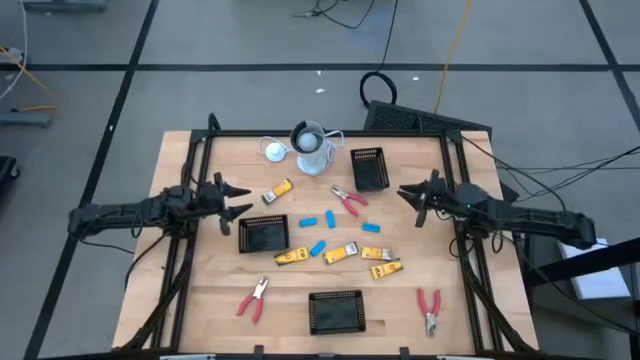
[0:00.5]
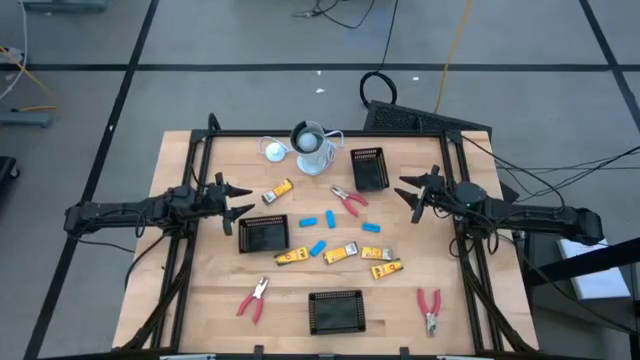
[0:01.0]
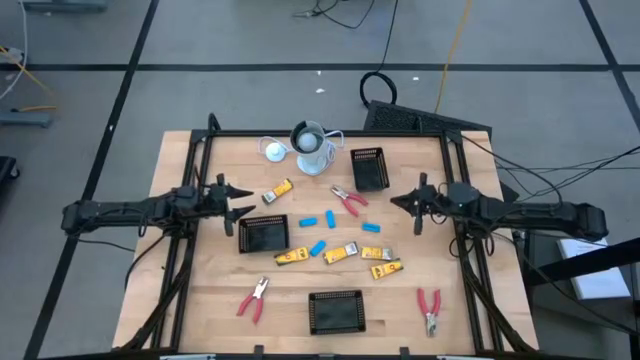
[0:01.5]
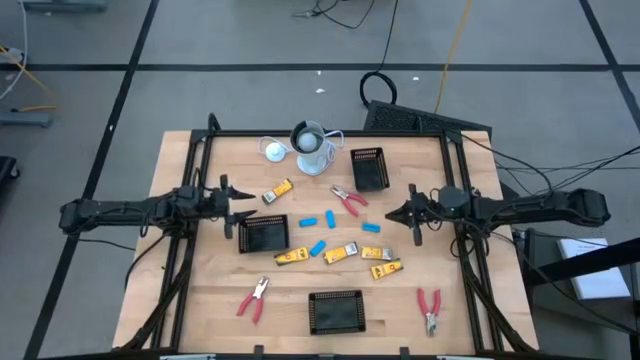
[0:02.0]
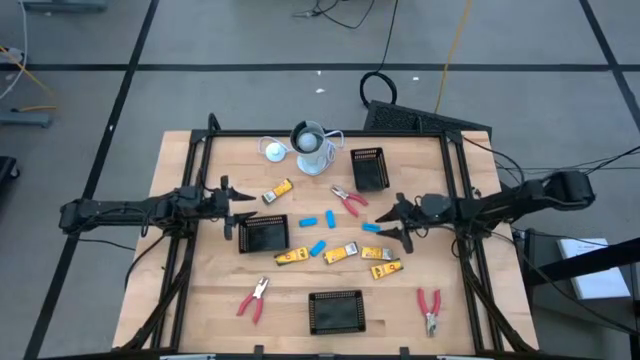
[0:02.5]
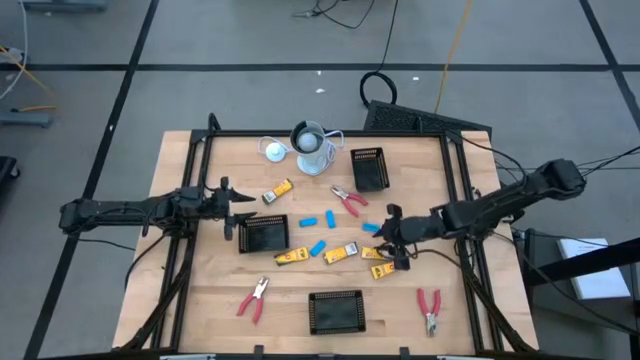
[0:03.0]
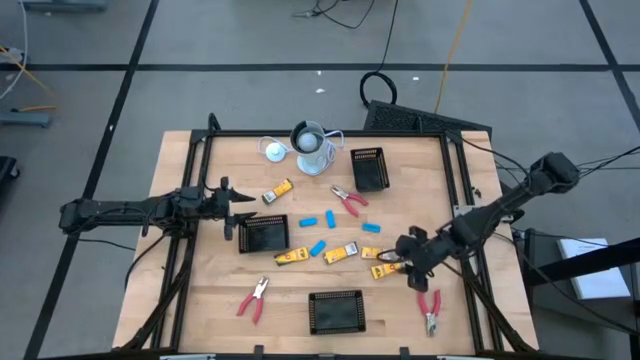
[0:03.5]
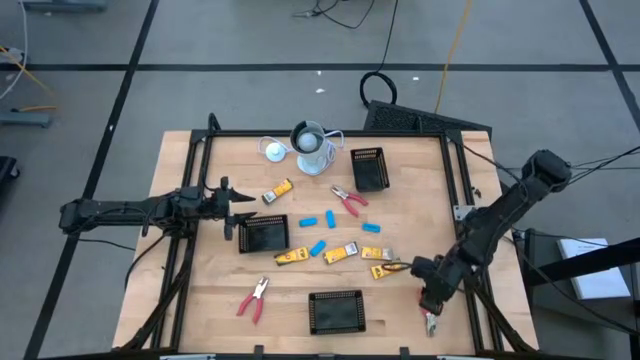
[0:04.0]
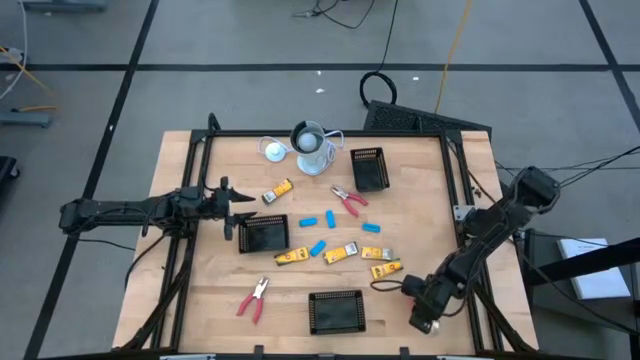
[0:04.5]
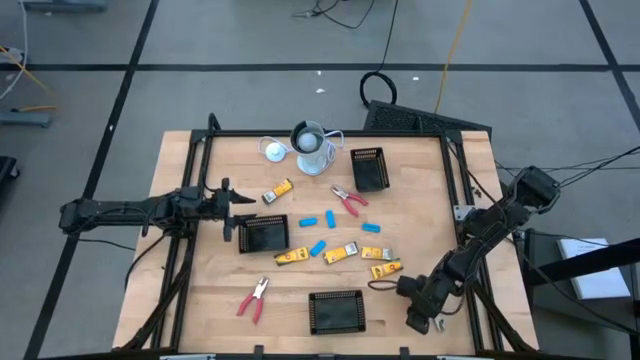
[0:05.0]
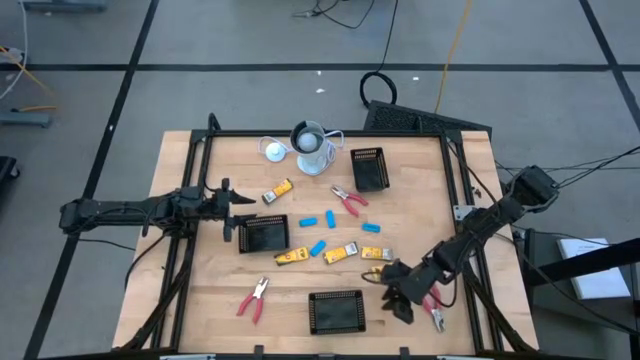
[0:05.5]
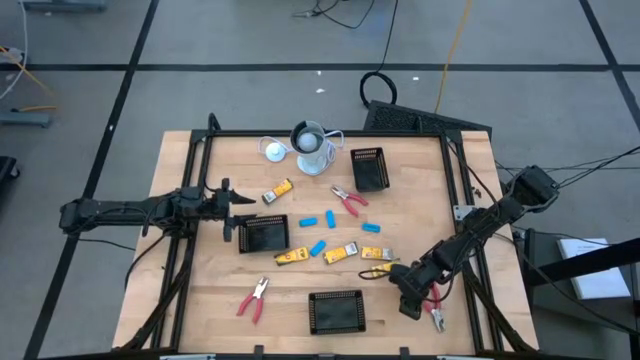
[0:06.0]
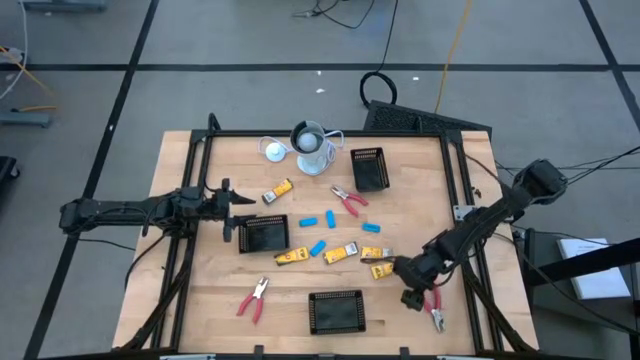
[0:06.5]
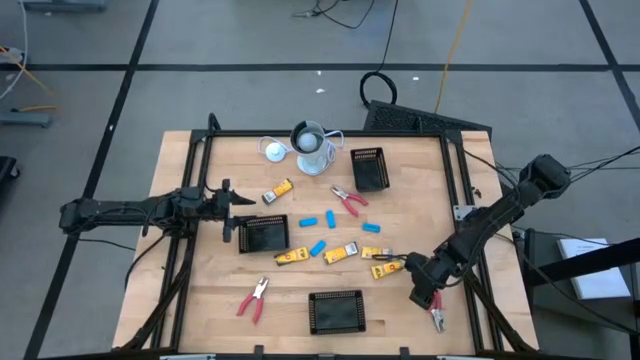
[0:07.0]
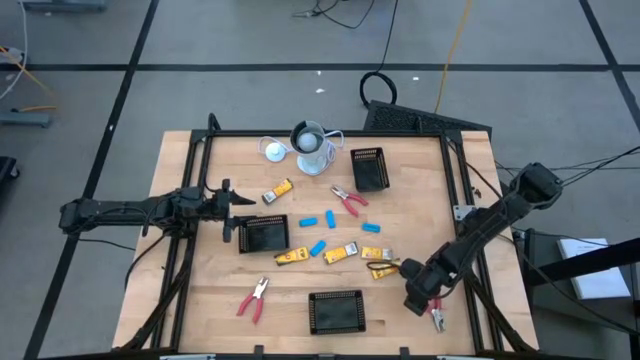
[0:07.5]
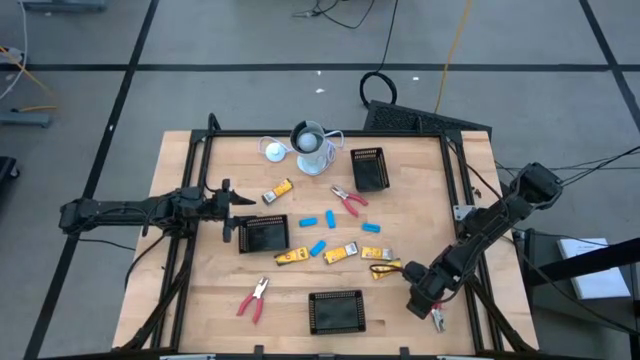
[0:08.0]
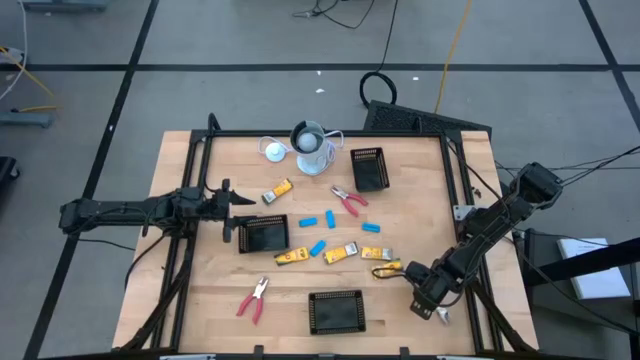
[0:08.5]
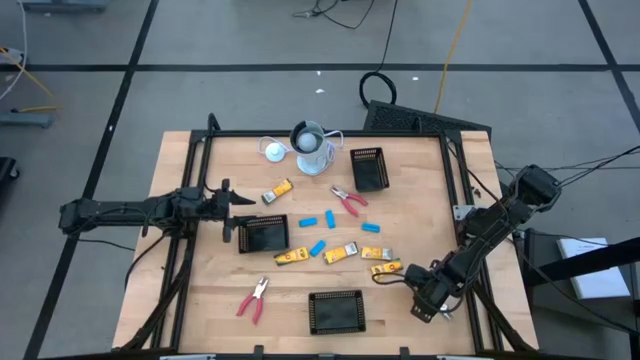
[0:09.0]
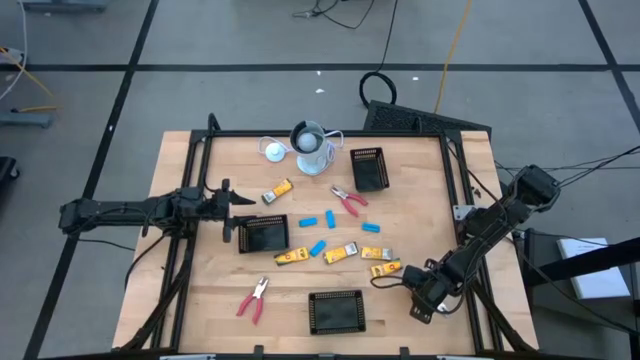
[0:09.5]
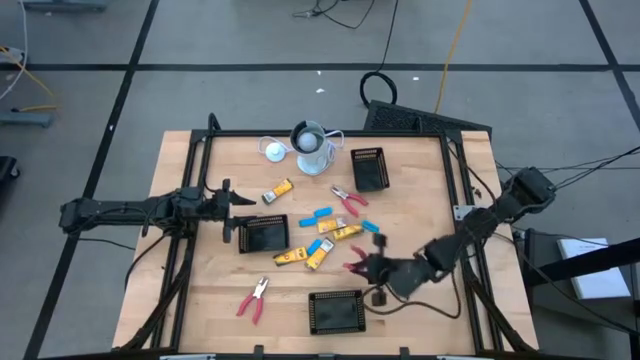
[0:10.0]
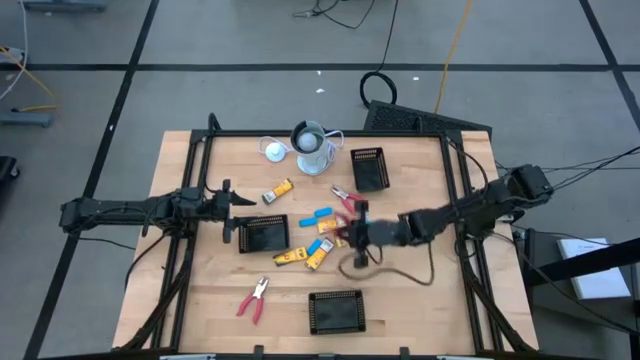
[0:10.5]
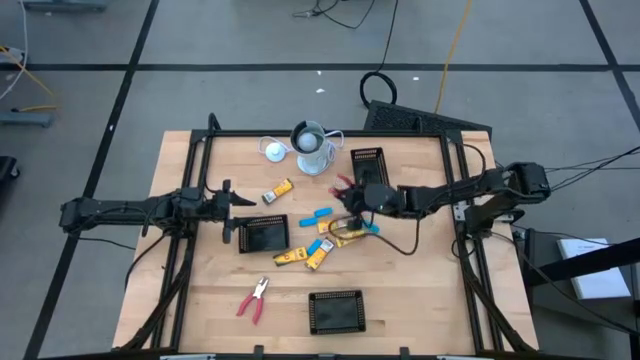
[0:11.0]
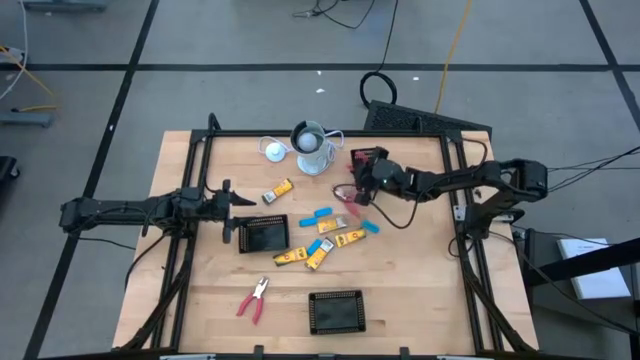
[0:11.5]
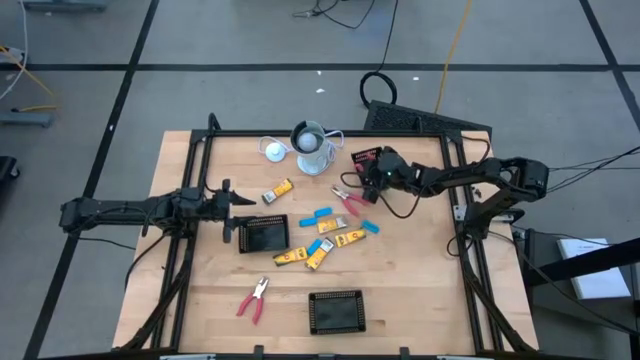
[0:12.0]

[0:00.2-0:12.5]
Task: Pick & Place School Supplies
Put the pink hole puncher into the top black bin

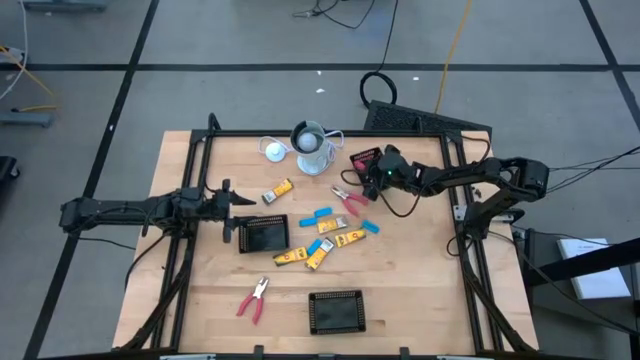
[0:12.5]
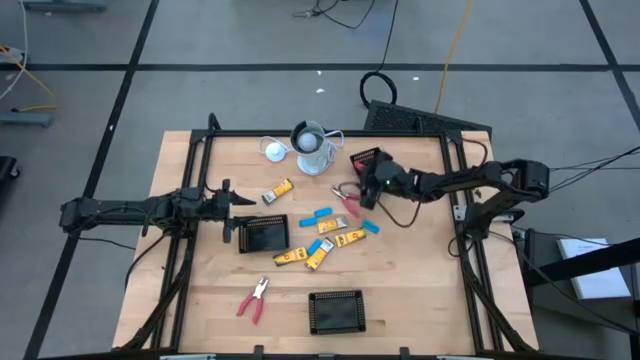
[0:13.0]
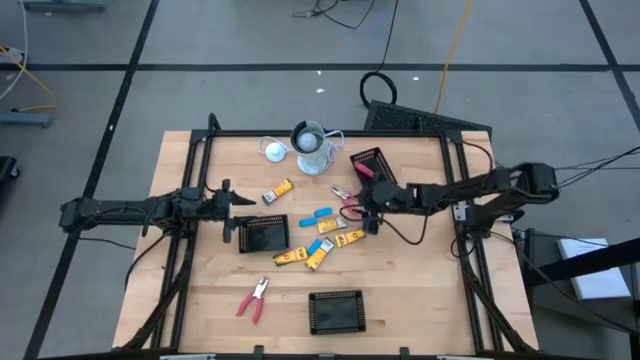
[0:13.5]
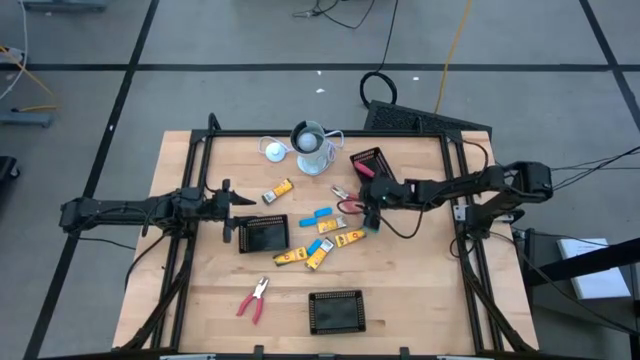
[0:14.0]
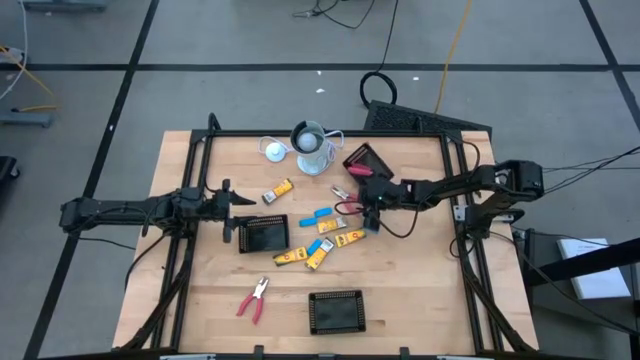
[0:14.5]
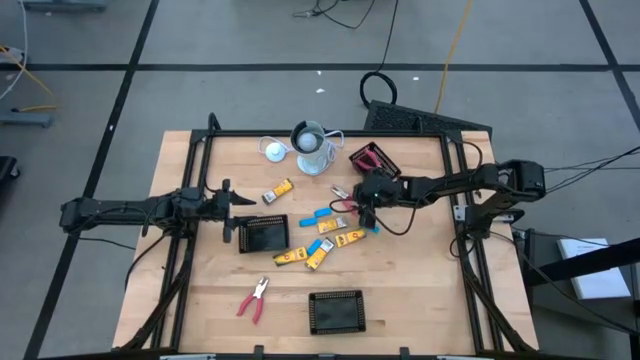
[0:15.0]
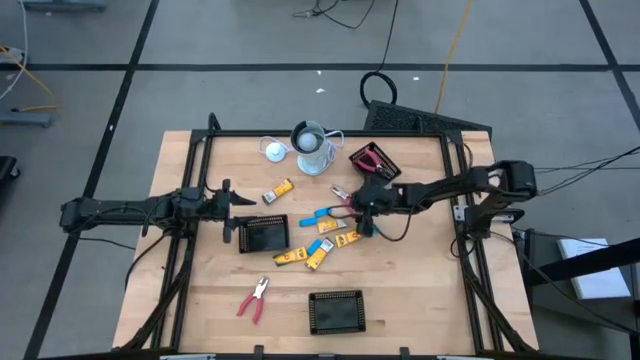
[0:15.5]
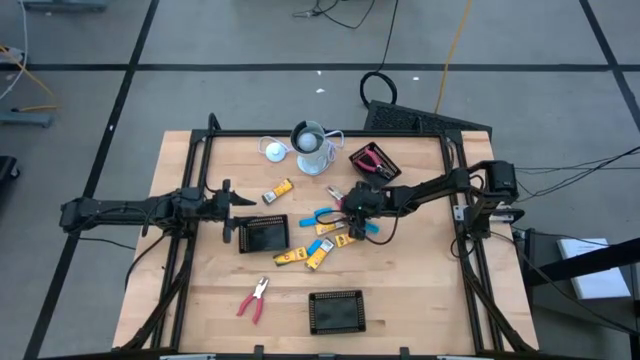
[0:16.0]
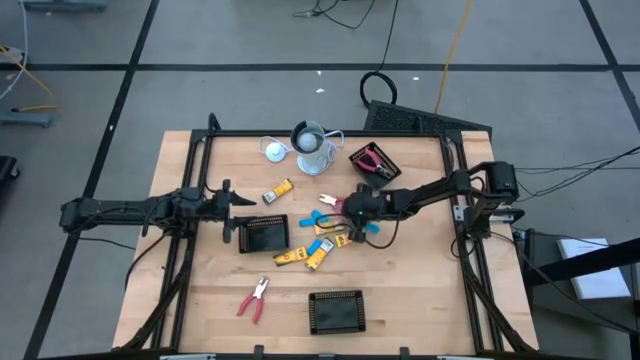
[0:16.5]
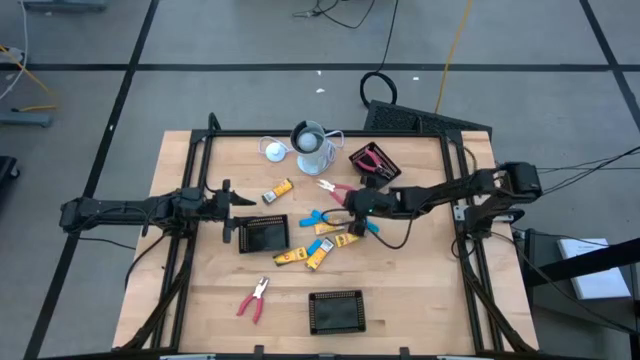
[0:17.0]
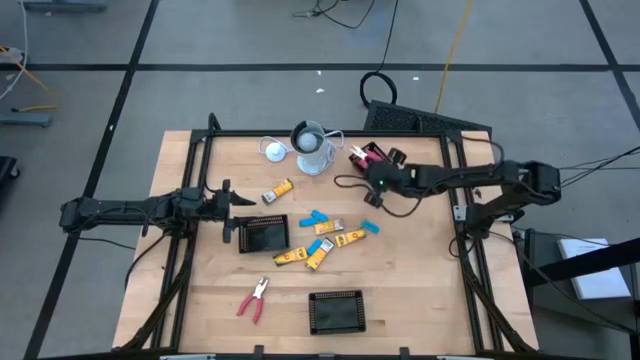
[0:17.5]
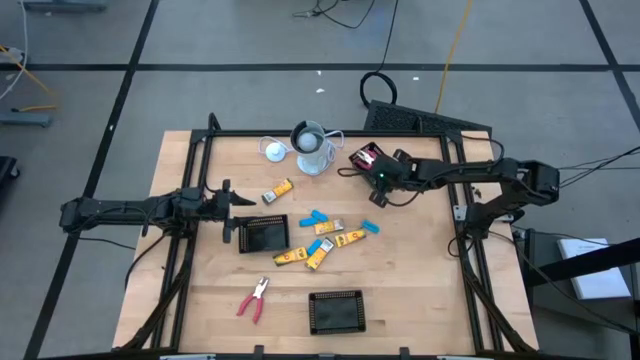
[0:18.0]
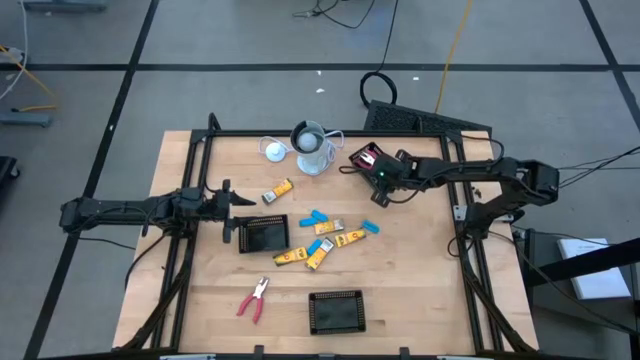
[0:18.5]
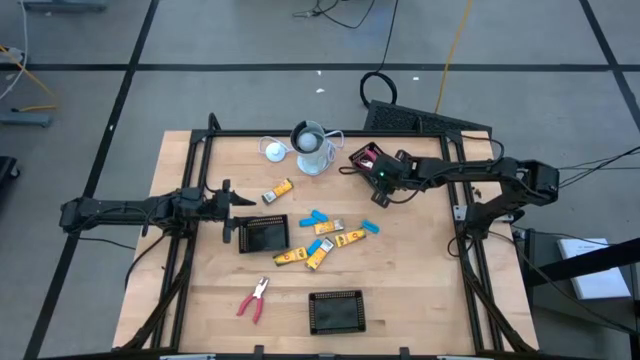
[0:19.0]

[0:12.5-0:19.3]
Put the pink hole puncher into the top black bin

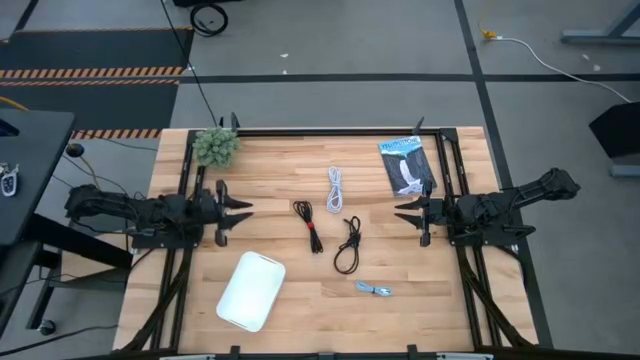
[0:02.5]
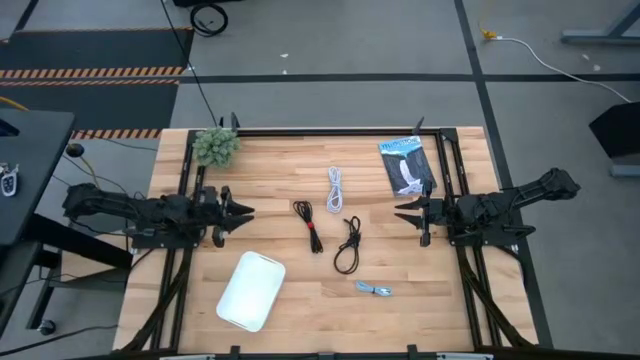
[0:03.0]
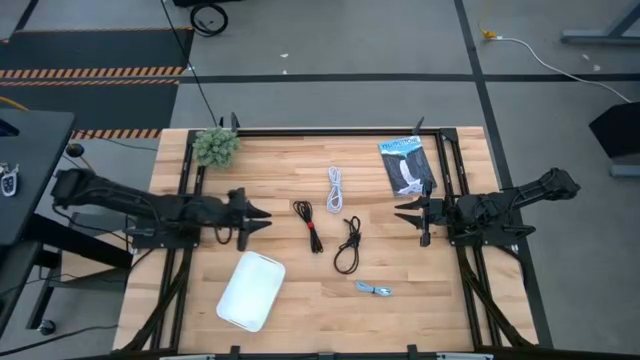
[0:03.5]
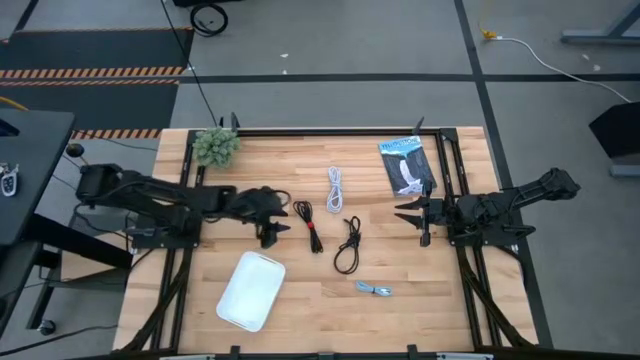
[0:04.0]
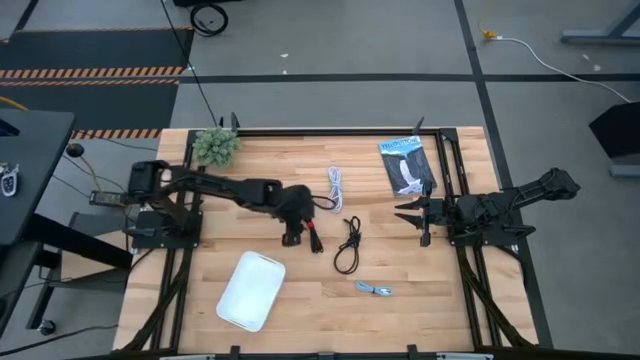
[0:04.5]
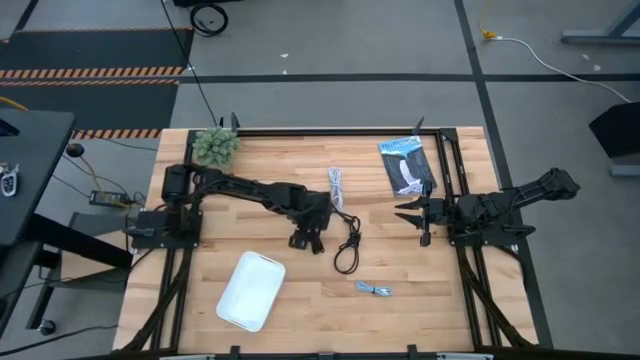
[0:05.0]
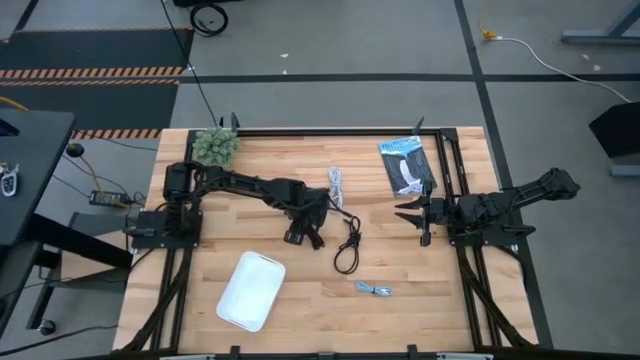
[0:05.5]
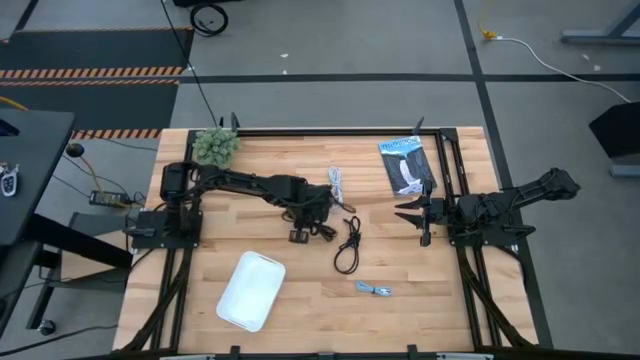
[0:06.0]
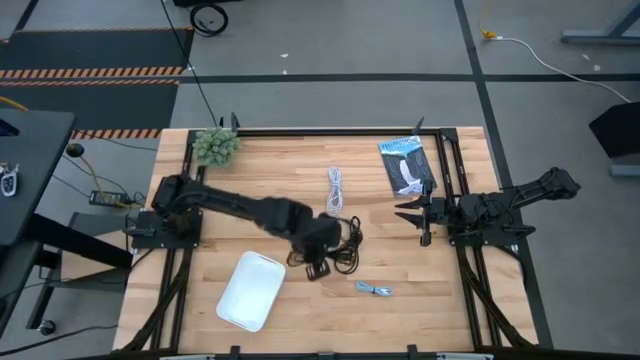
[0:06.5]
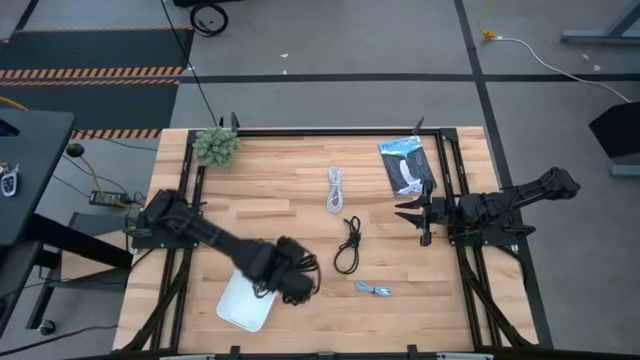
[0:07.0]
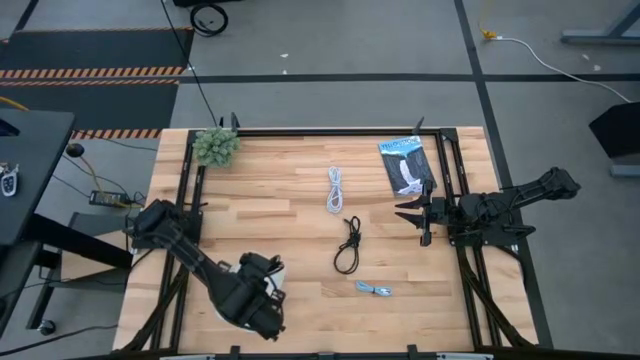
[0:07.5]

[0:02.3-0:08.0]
Task: Pick and place USB-C Cables
Put the left black charger cable into the white bin
